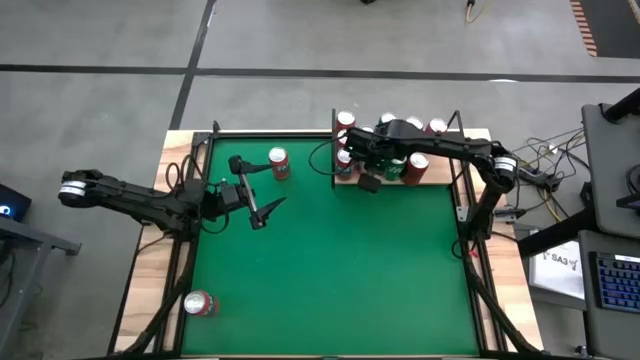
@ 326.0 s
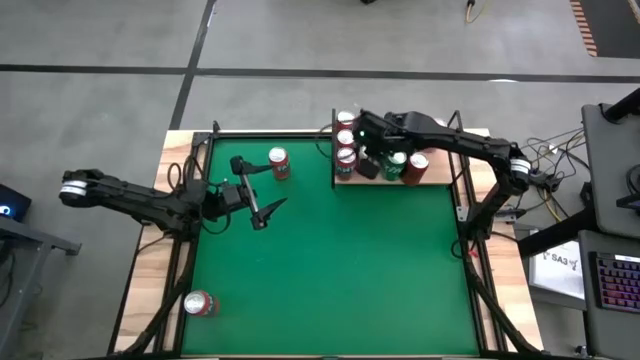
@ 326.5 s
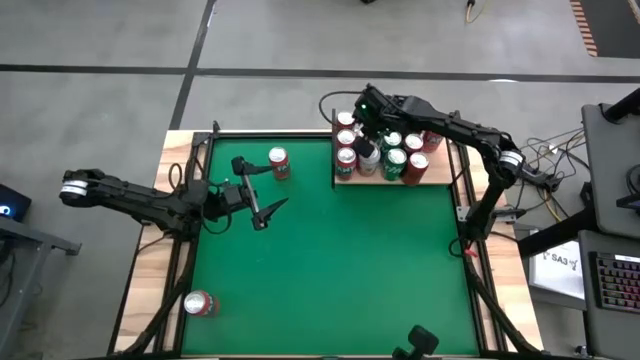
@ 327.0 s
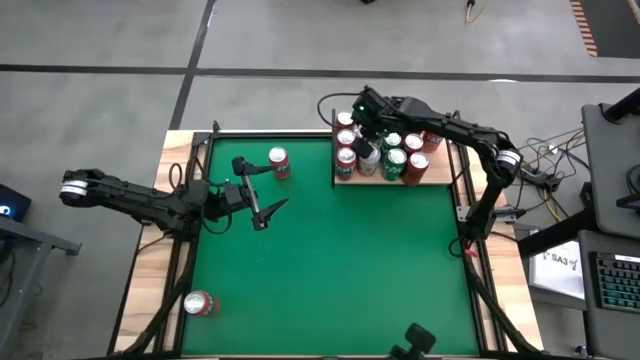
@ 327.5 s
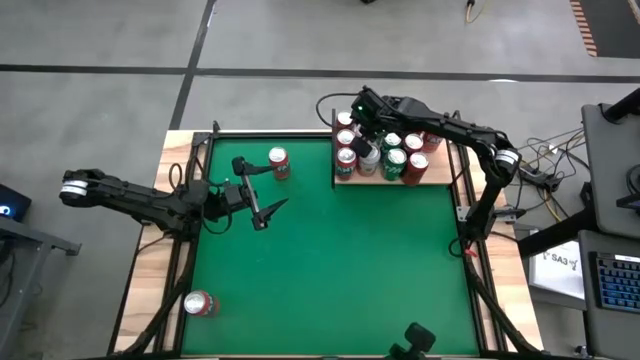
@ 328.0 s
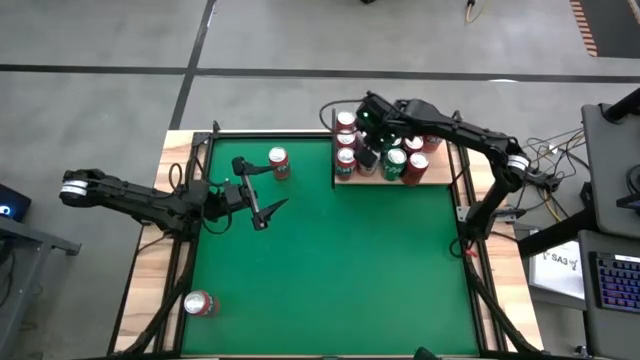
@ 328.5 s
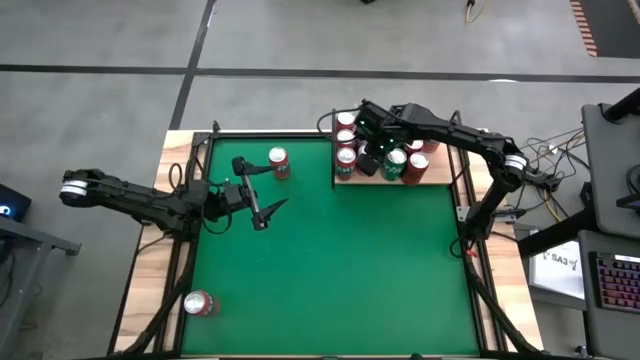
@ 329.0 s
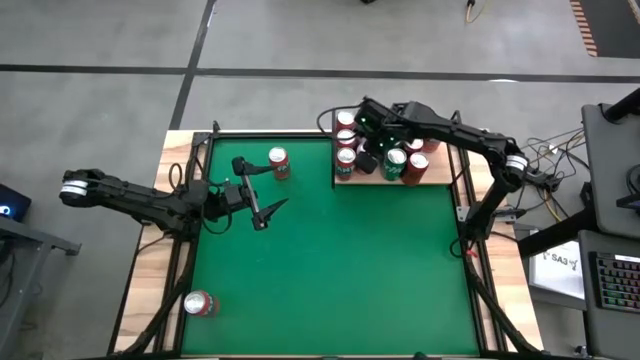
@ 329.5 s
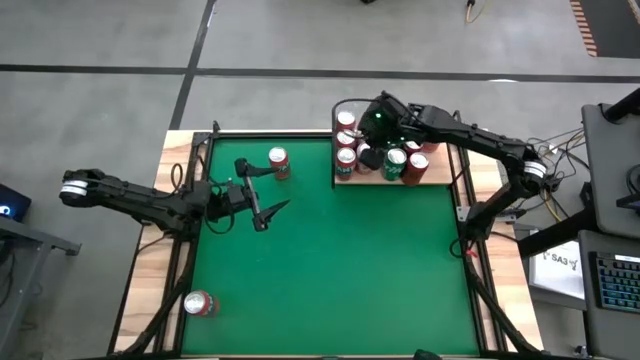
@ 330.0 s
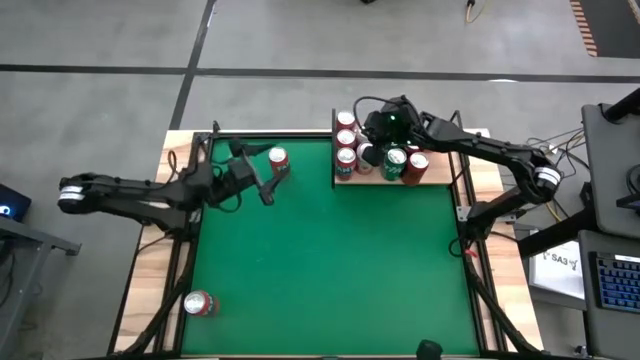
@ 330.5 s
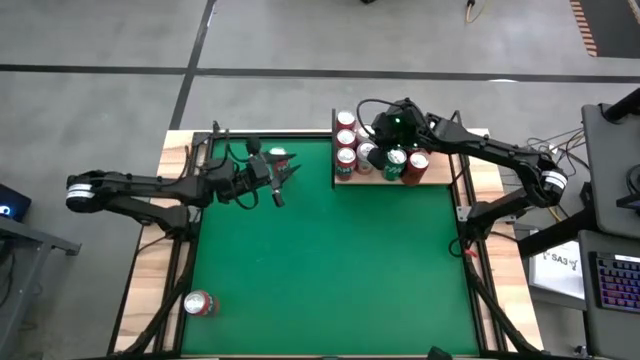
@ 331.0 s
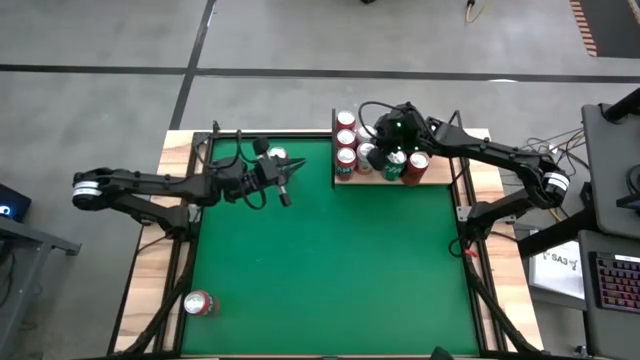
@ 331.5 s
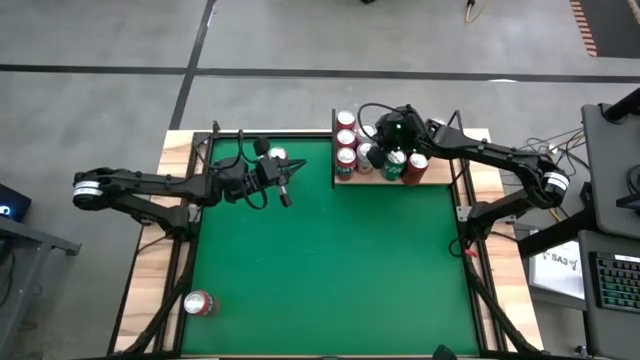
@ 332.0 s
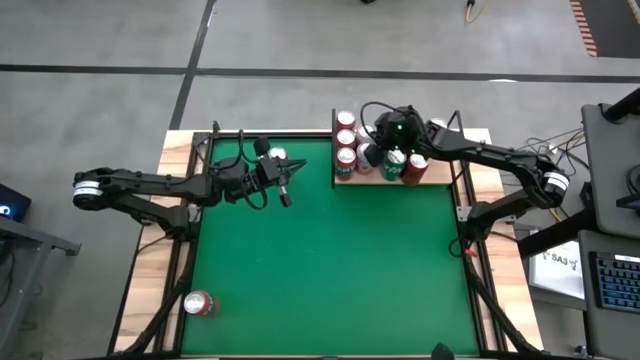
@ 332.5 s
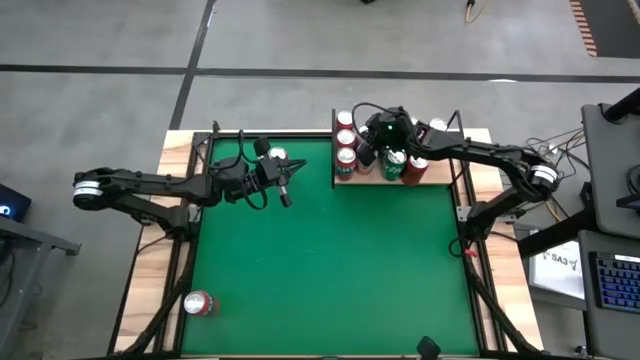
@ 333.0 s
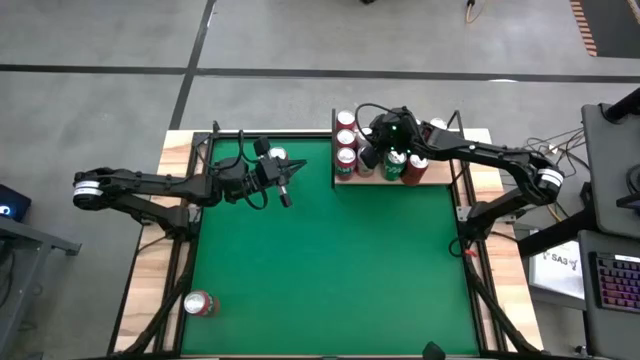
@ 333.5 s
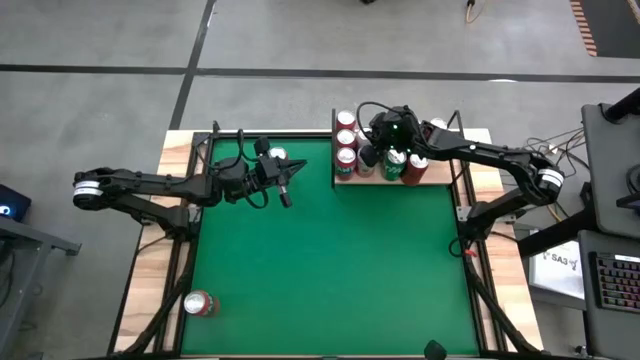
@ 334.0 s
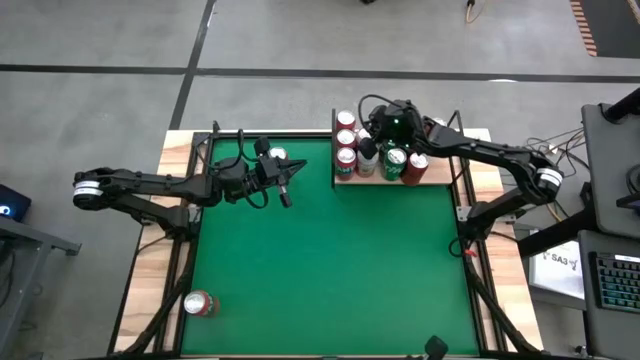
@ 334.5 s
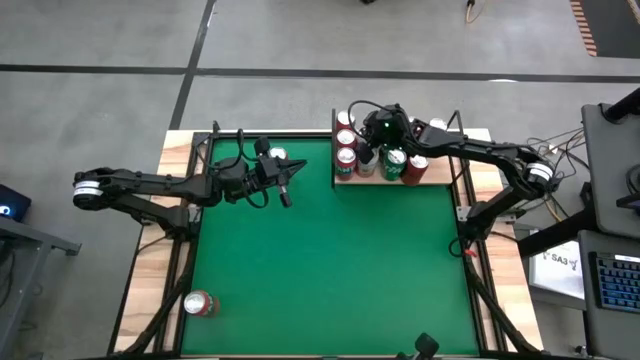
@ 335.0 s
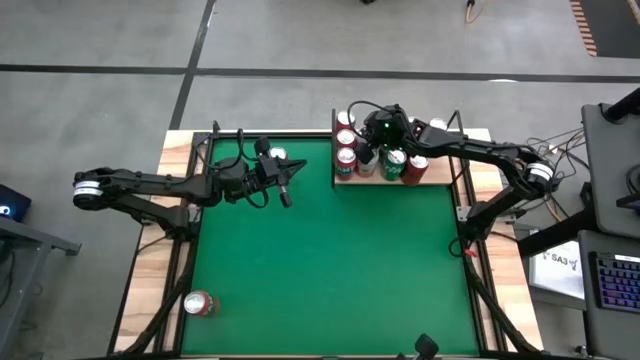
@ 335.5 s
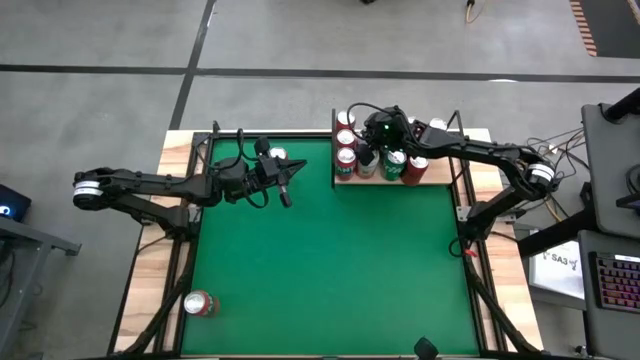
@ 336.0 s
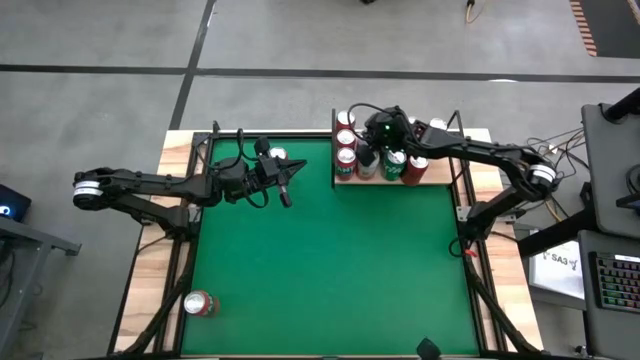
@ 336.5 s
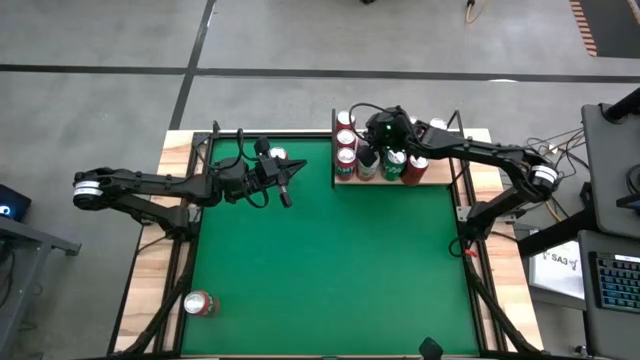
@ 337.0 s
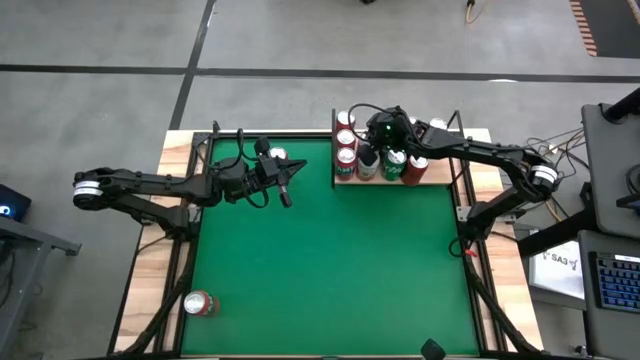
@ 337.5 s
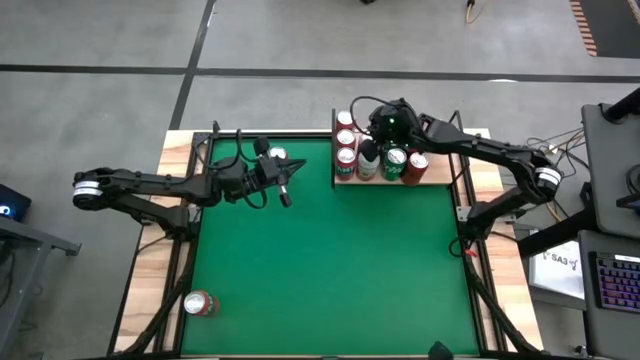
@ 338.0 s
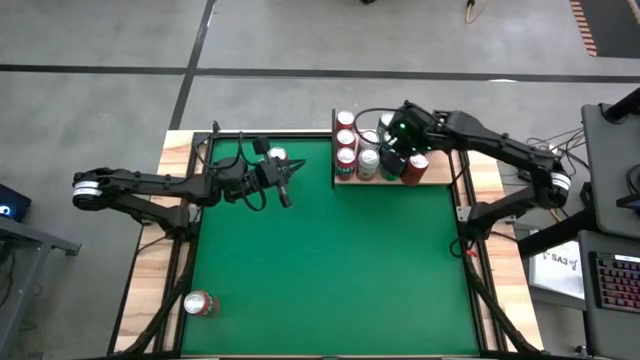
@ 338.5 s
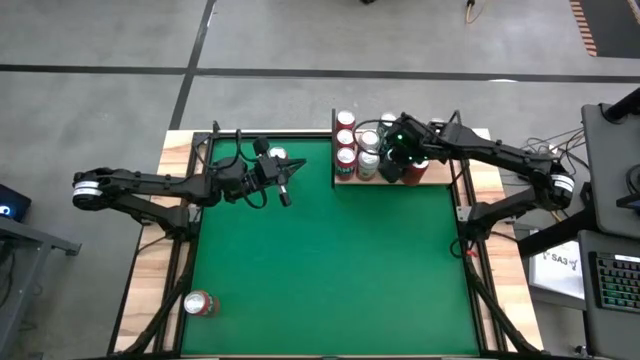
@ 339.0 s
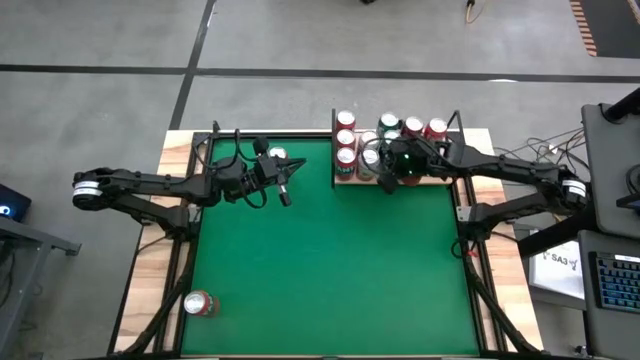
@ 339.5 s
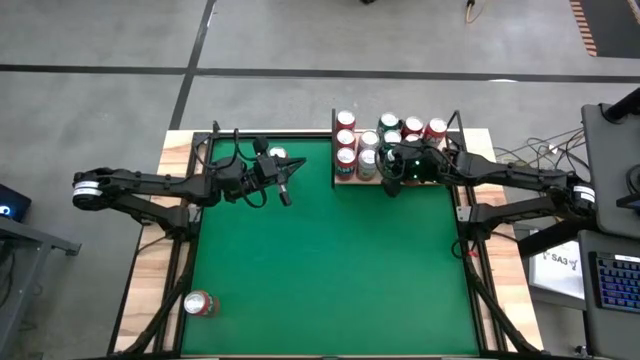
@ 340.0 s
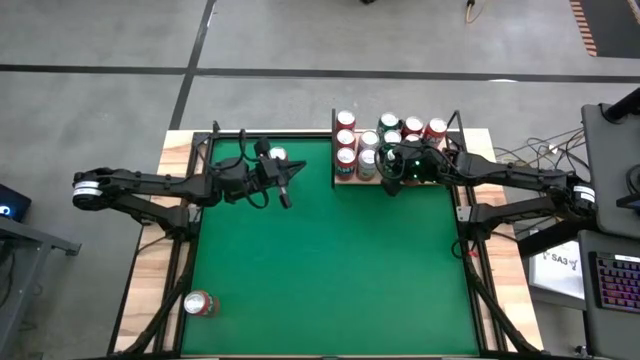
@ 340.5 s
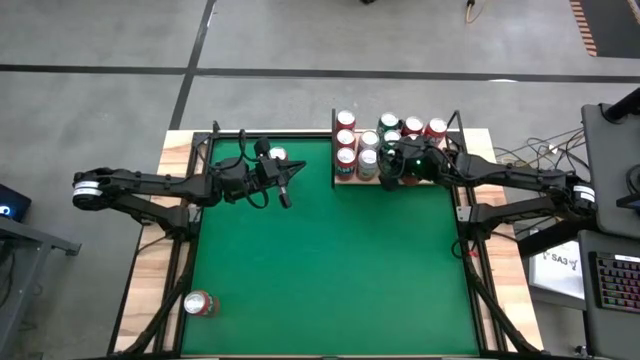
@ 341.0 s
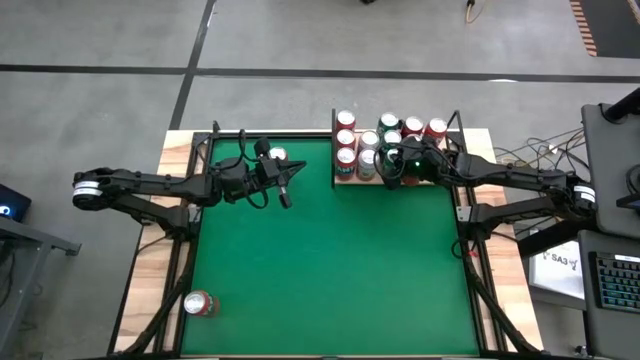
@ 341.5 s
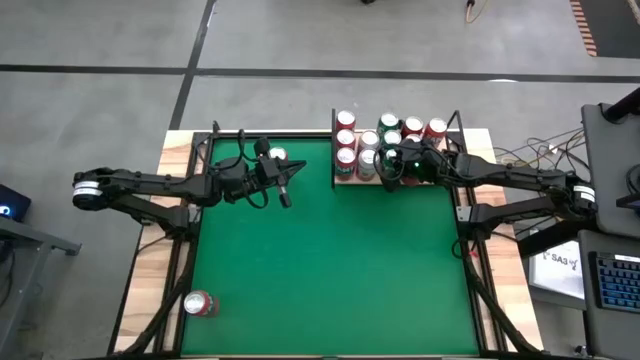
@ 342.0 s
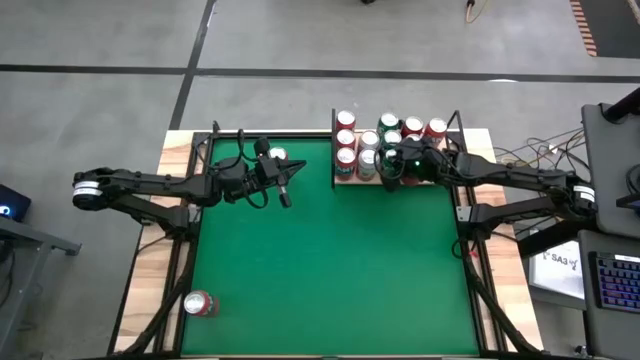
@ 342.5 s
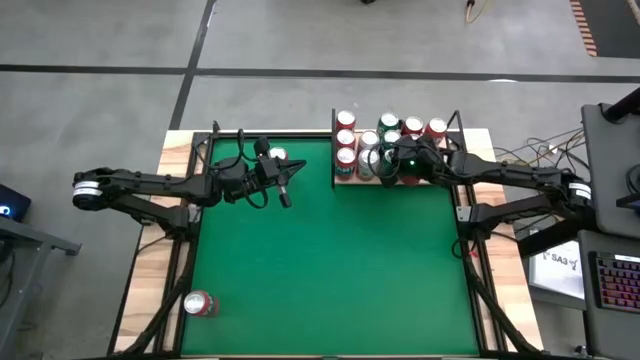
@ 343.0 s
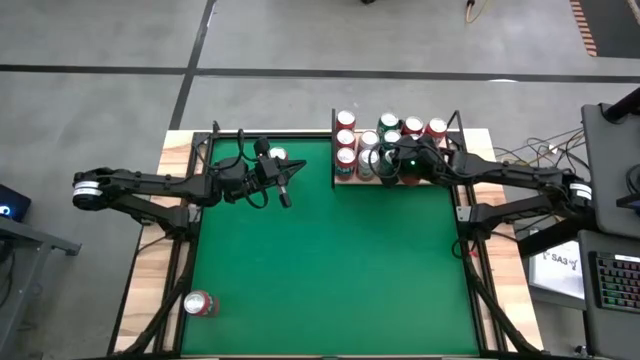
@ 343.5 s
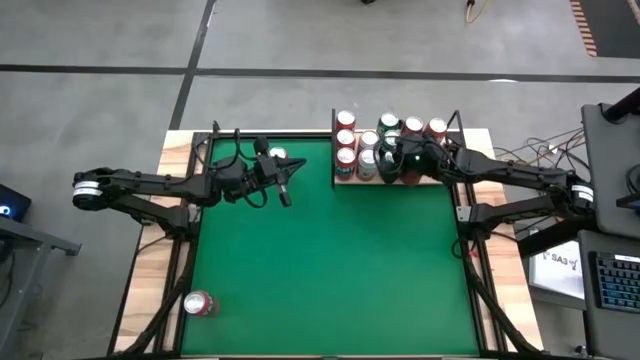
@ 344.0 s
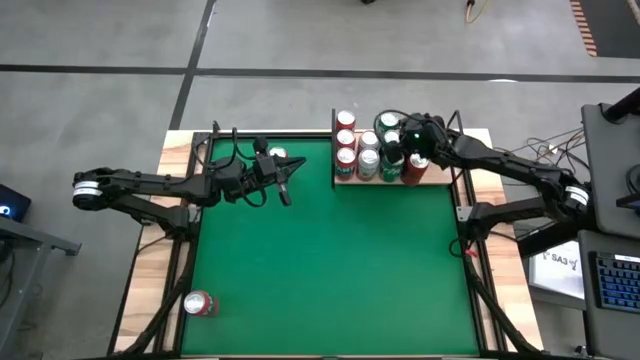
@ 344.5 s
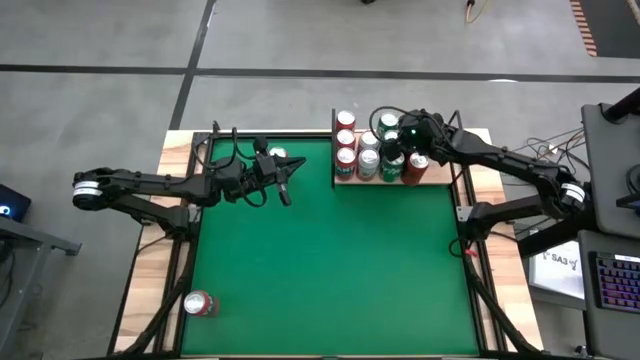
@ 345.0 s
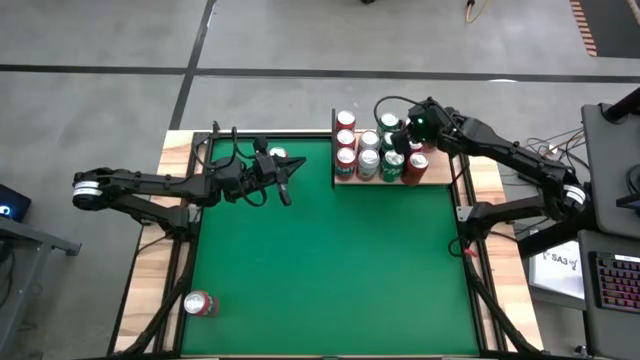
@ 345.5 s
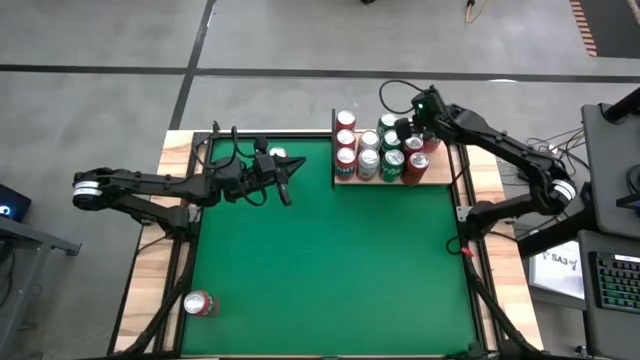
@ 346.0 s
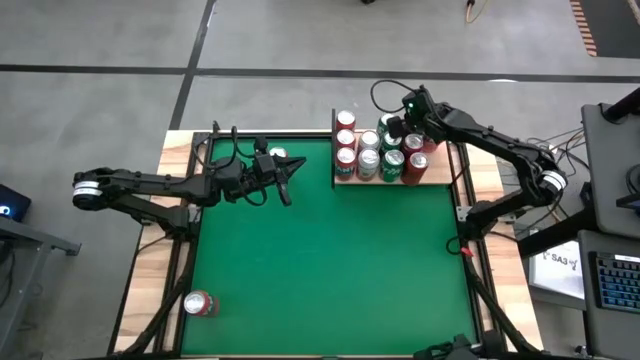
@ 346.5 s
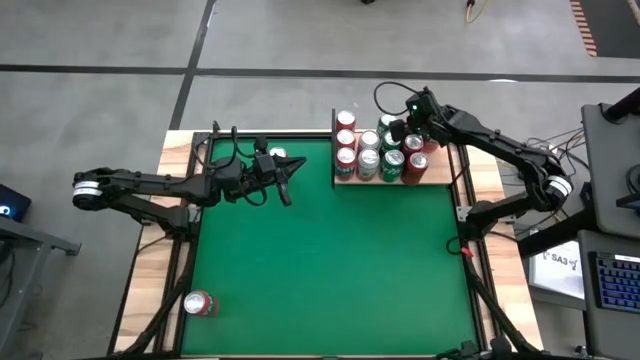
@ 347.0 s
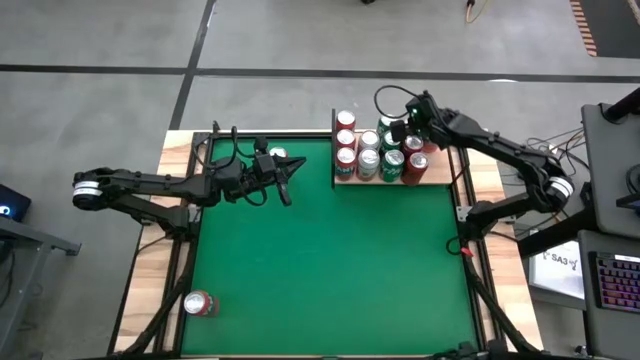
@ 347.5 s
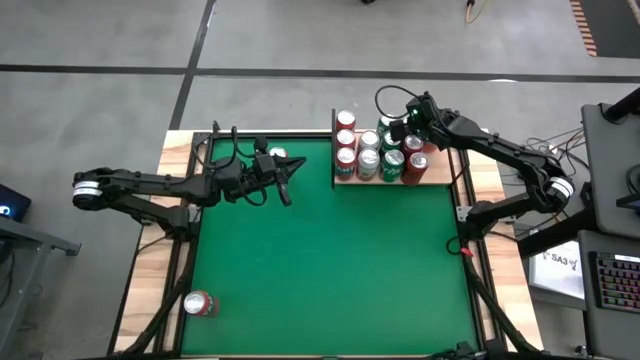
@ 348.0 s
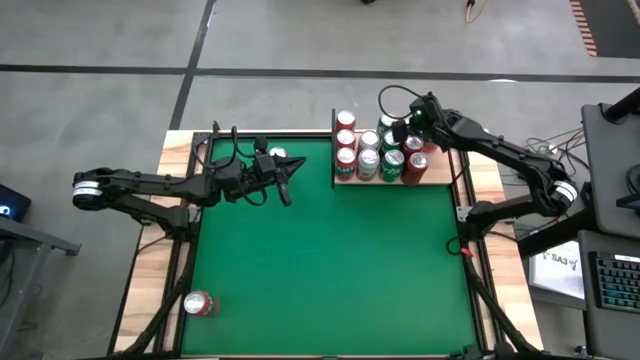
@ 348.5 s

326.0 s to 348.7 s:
Task: Place canned beverage on shelf
Adjust the soda cans on the shelf
